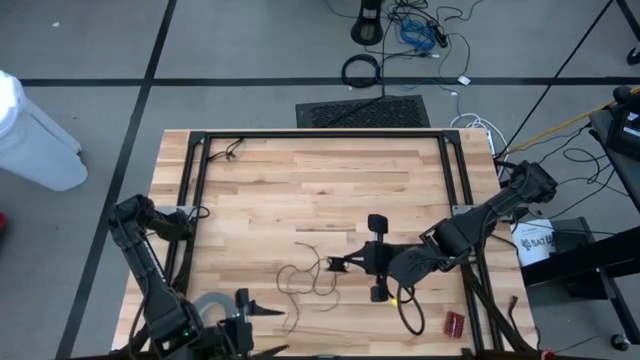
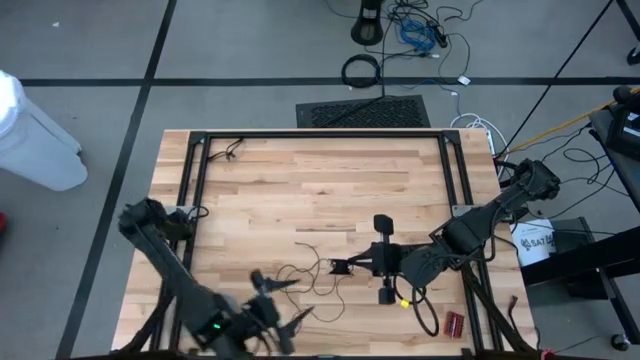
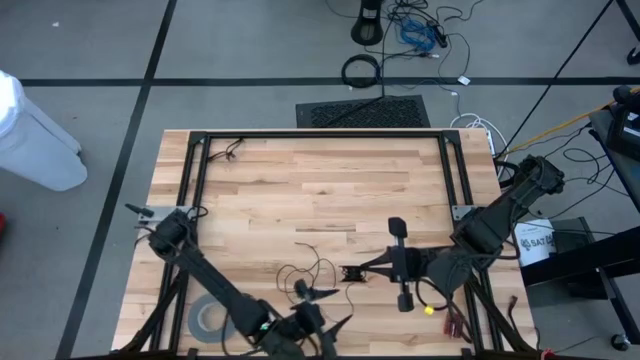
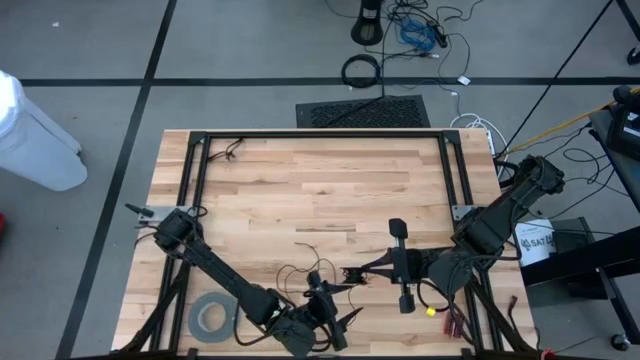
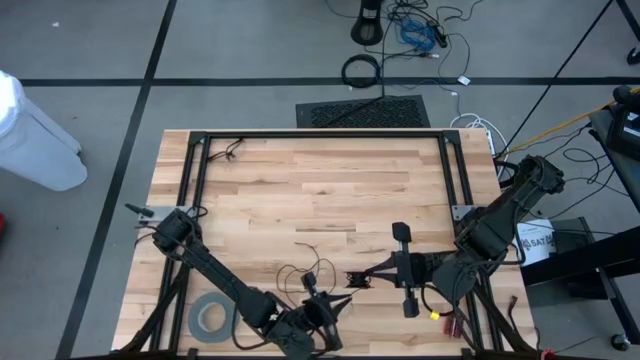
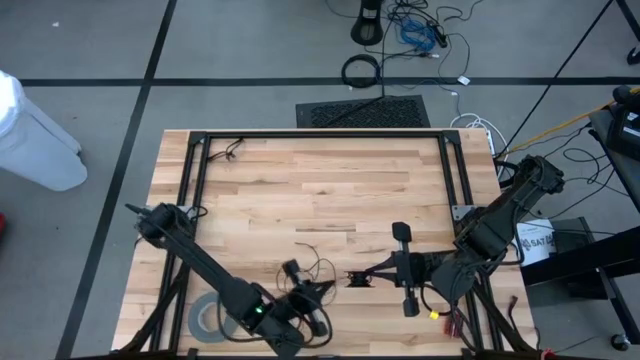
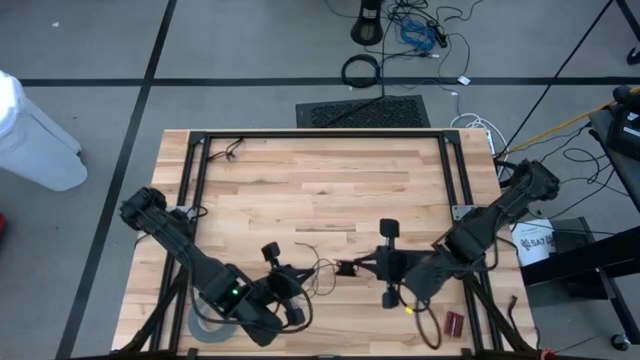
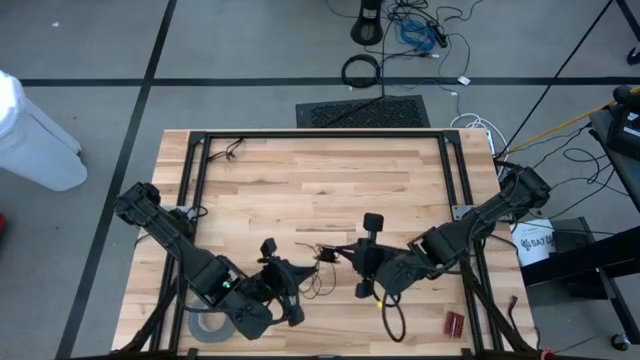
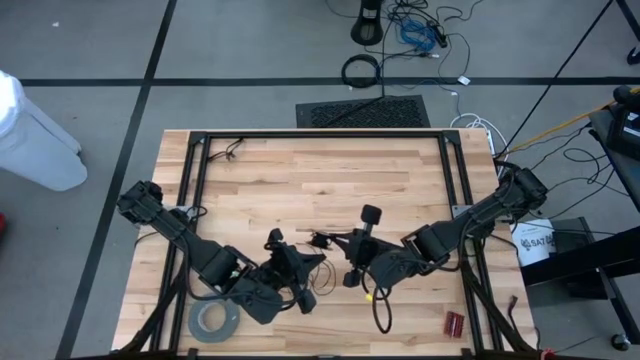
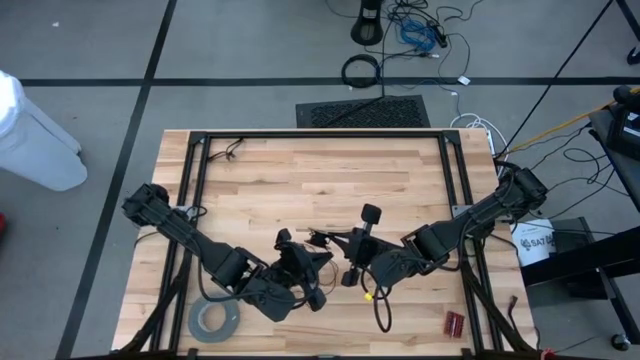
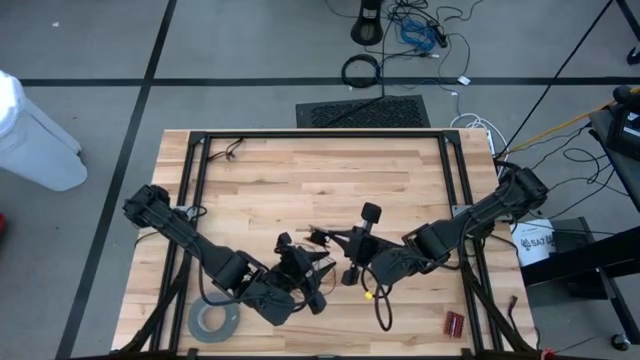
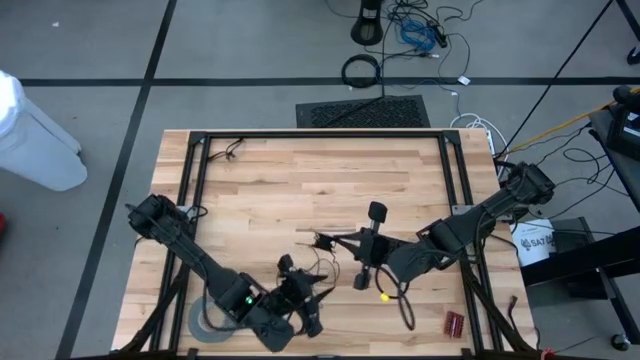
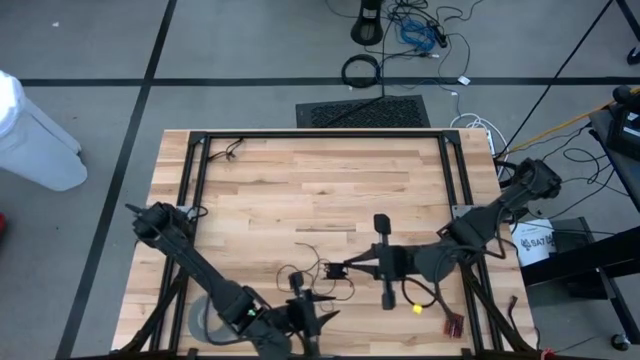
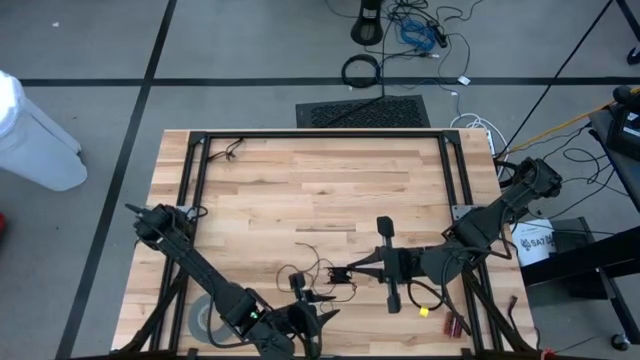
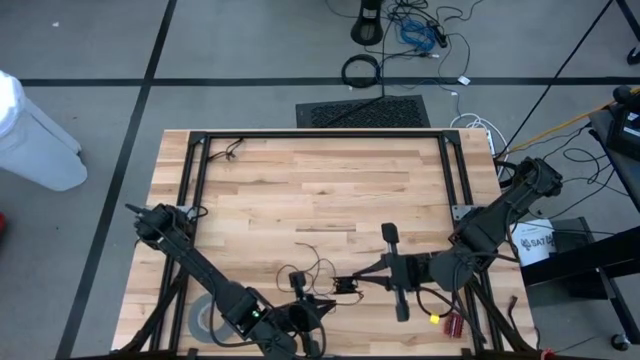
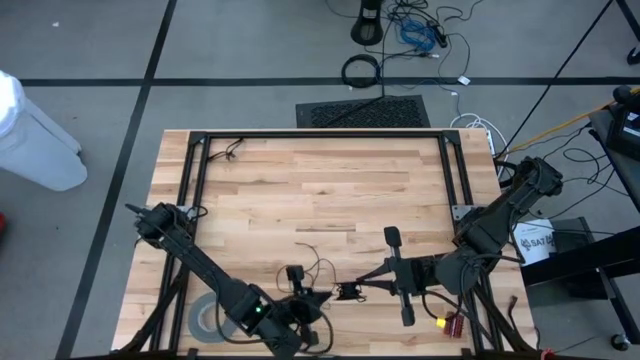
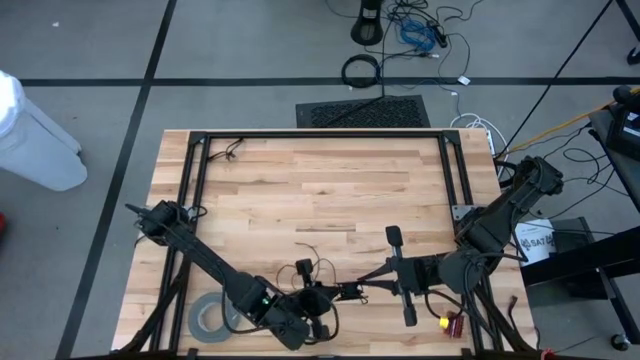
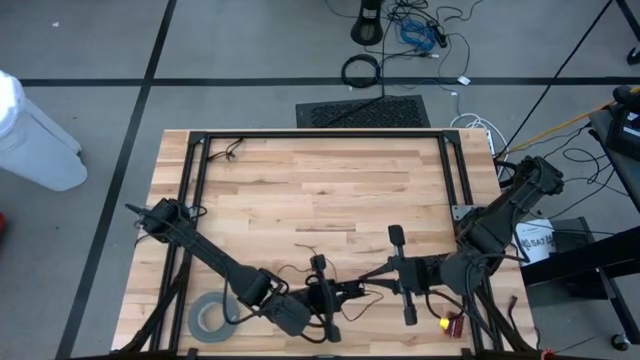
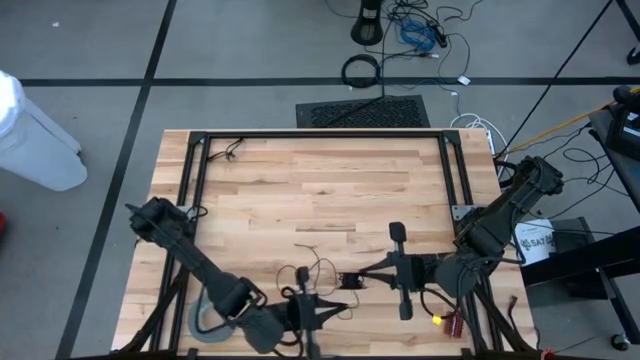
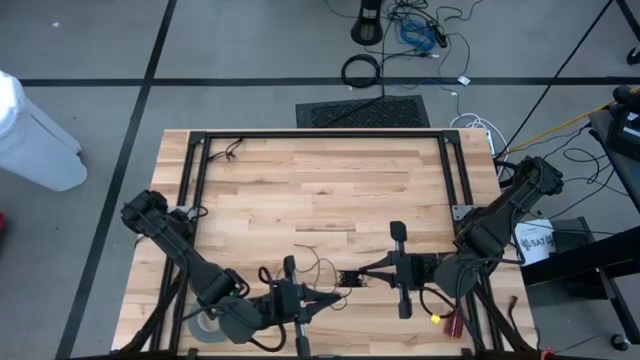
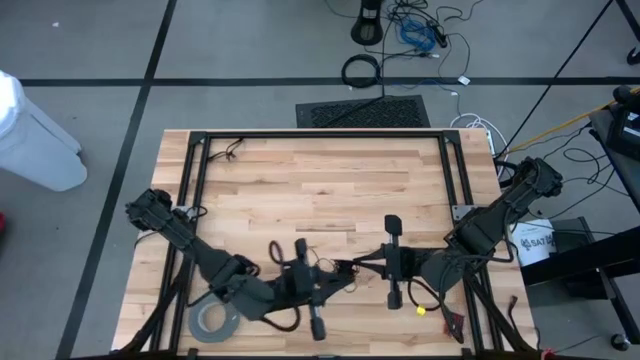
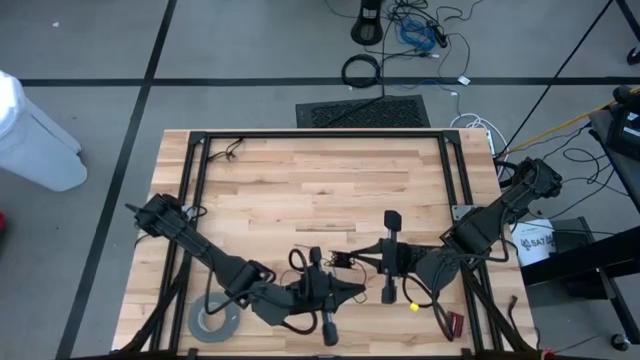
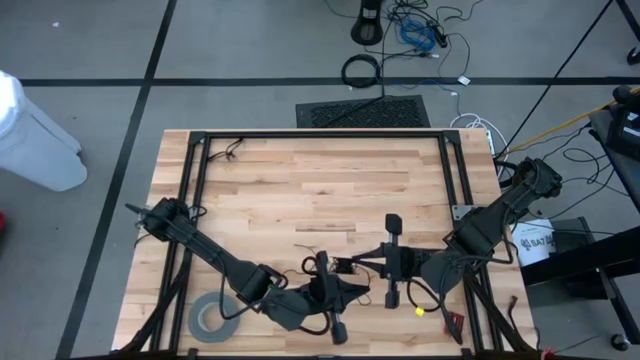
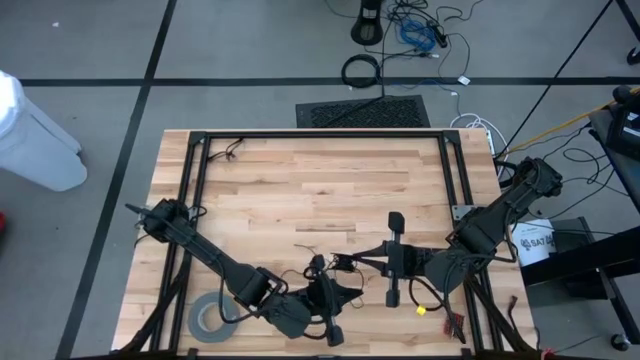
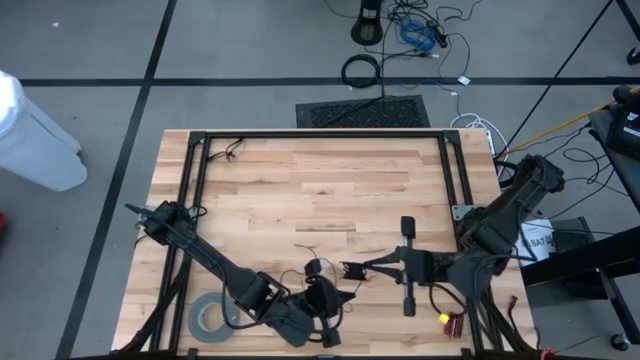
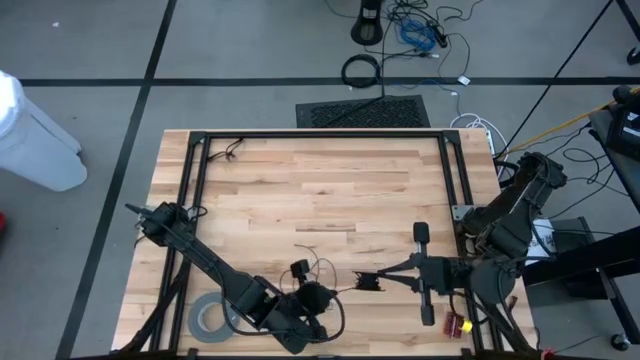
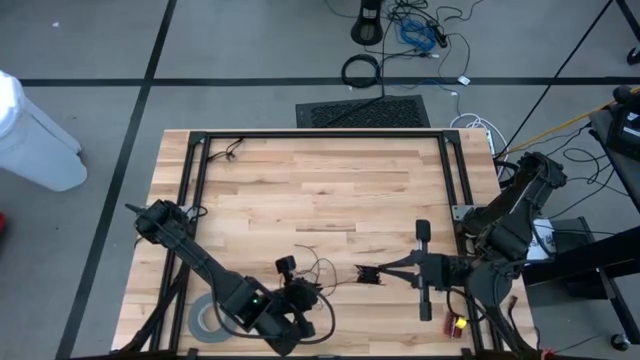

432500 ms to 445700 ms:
Task: Coil cords
Coil the black wire onto the spool

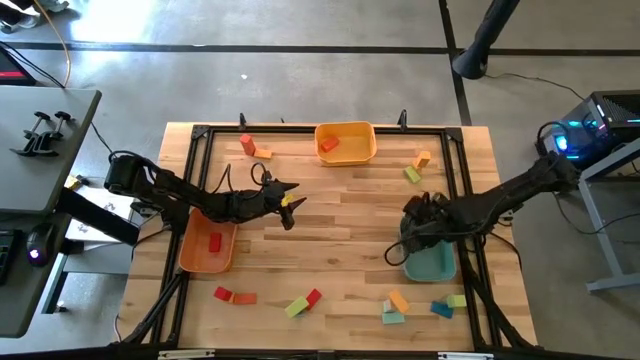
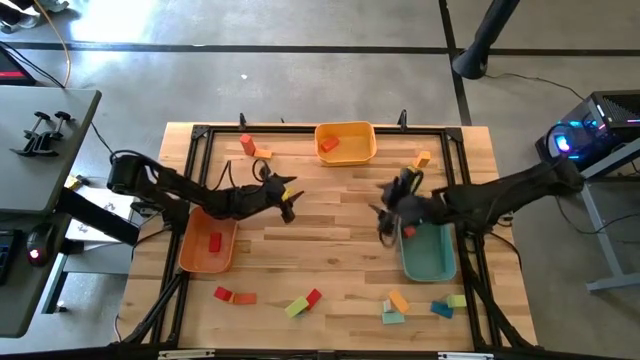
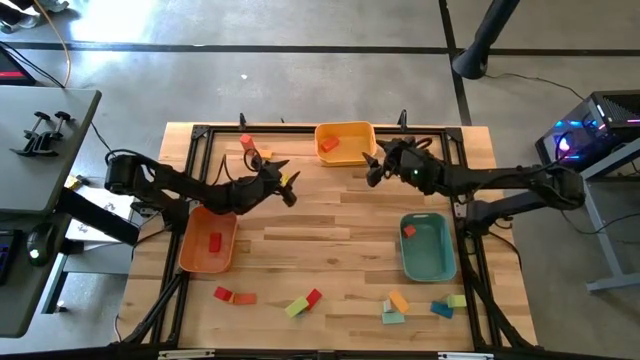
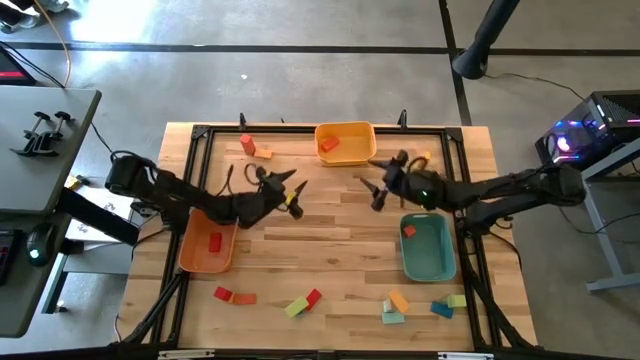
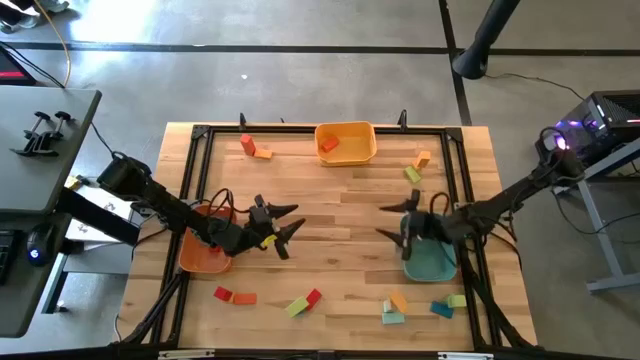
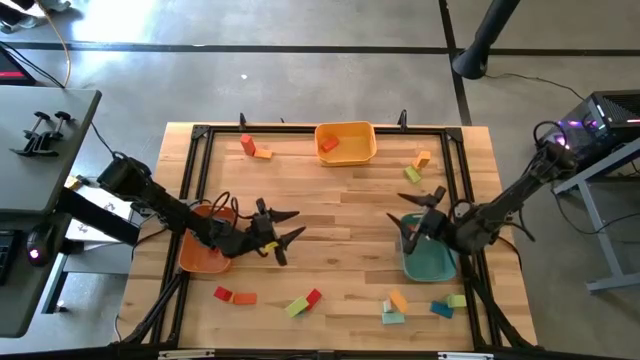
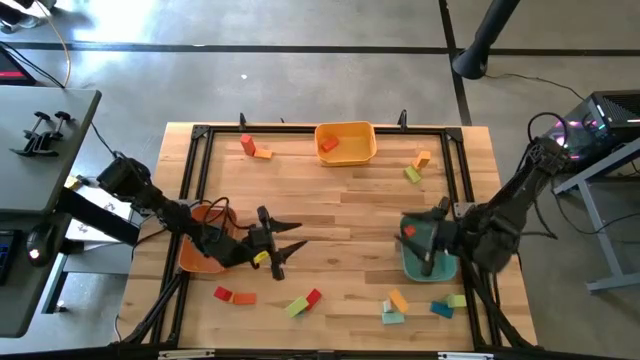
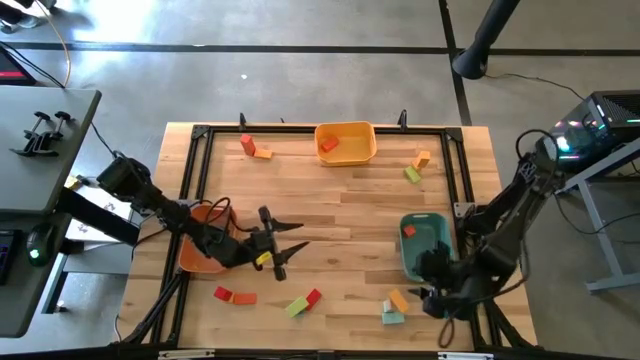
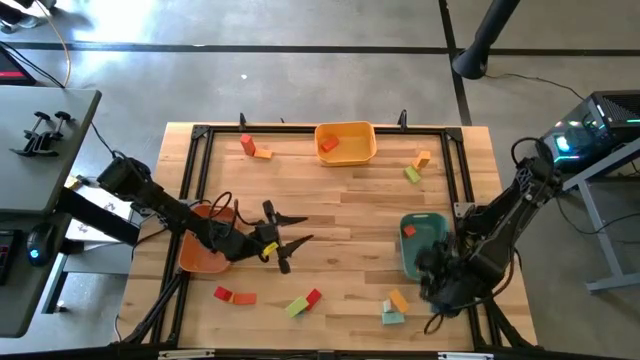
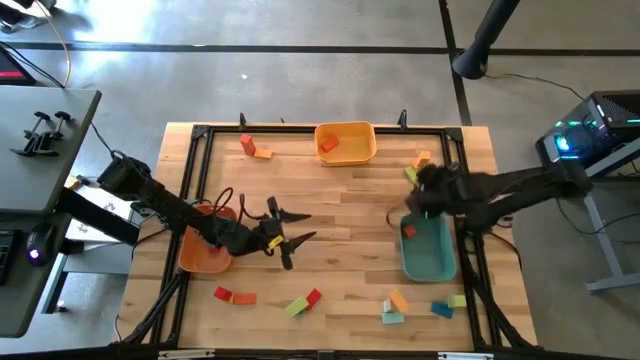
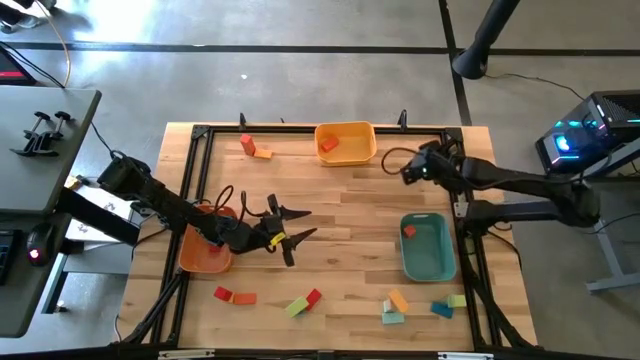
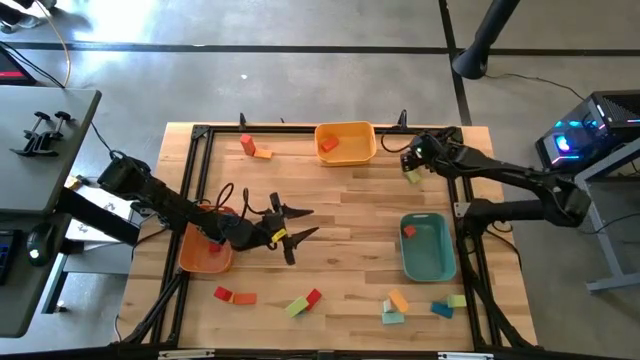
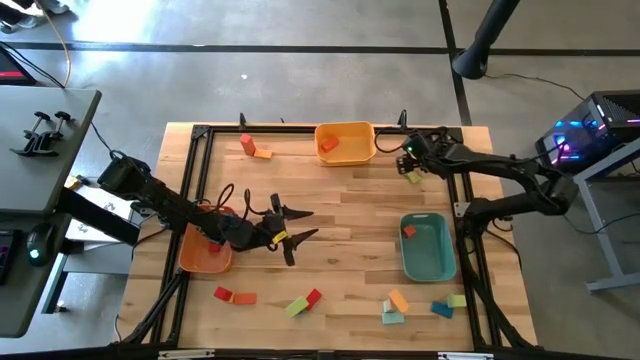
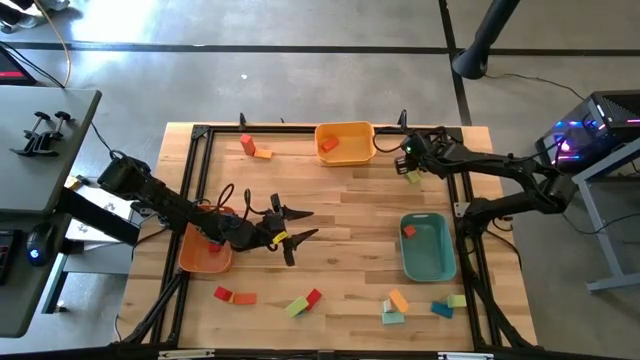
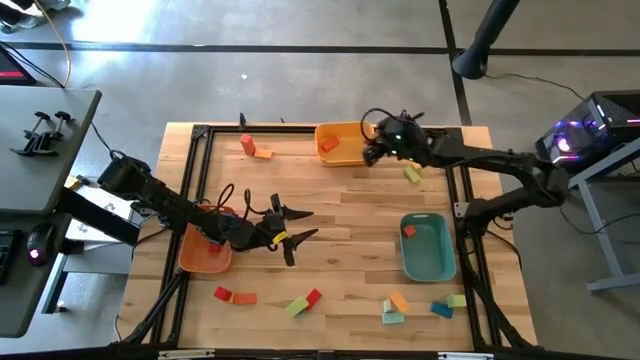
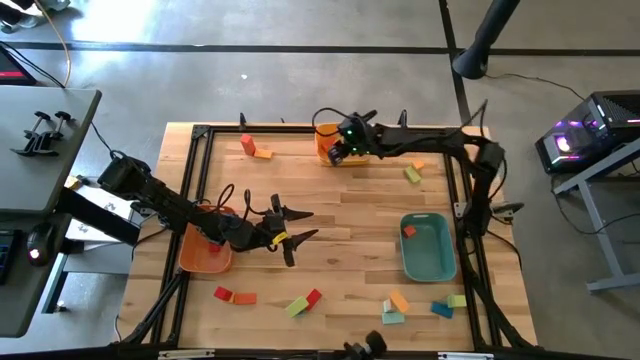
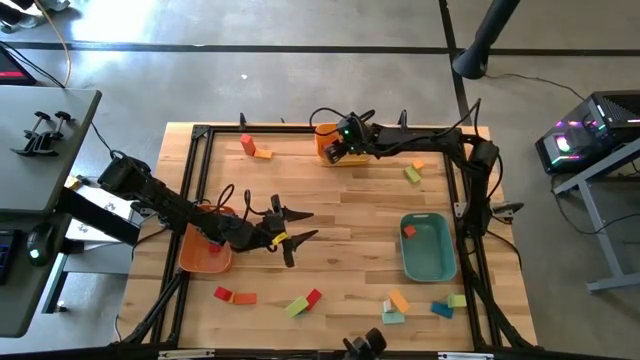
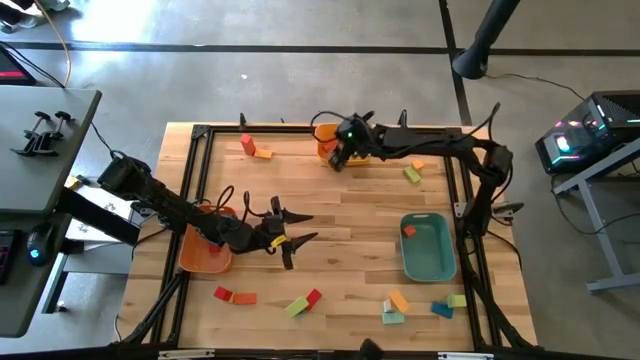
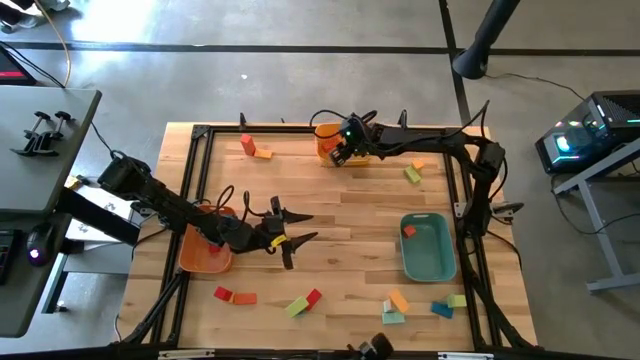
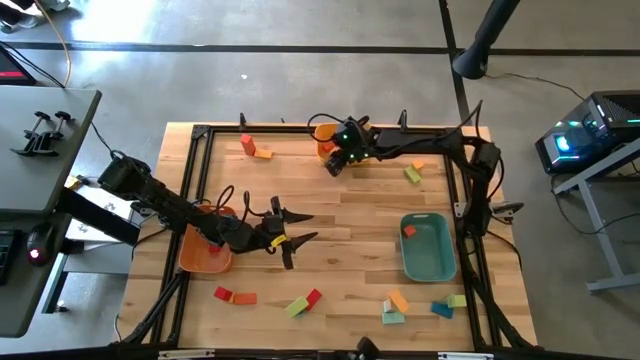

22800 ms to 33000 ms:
Task: Sort blocks by size
Put the yellow large block into the yellow bin
